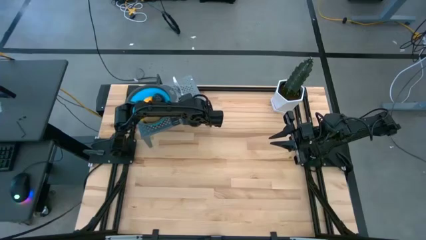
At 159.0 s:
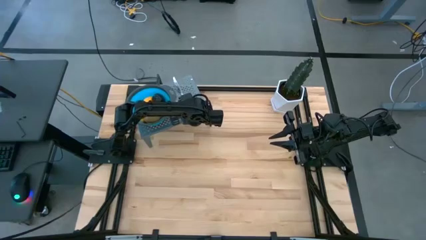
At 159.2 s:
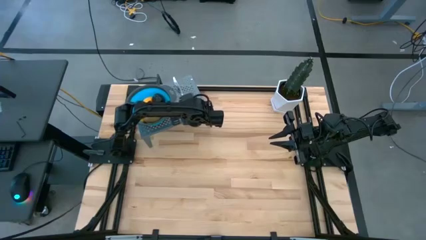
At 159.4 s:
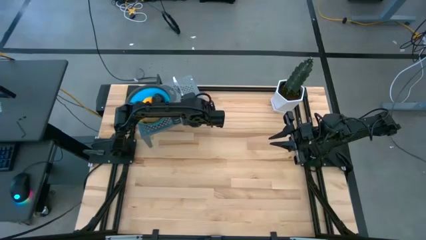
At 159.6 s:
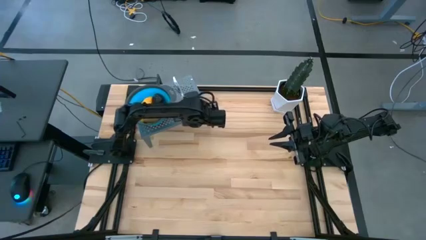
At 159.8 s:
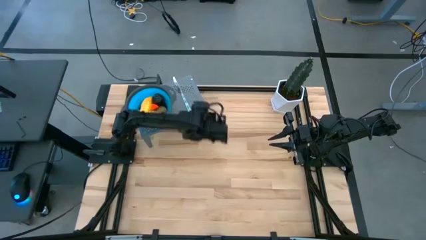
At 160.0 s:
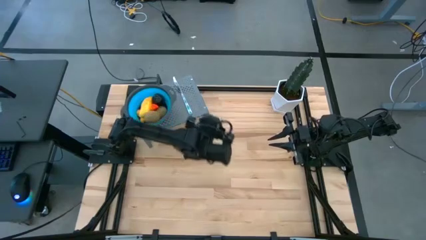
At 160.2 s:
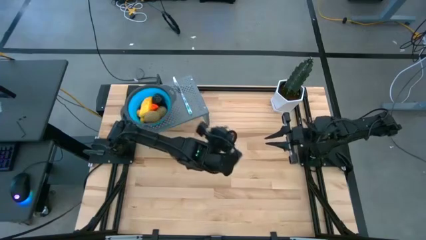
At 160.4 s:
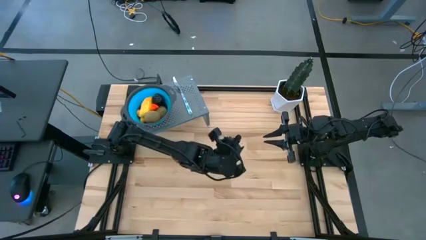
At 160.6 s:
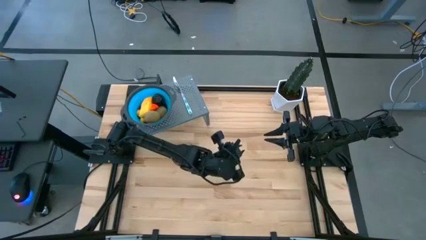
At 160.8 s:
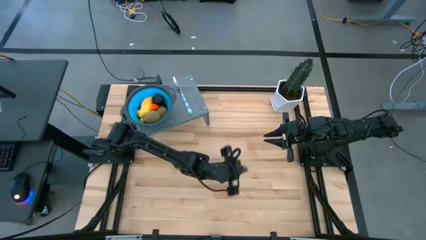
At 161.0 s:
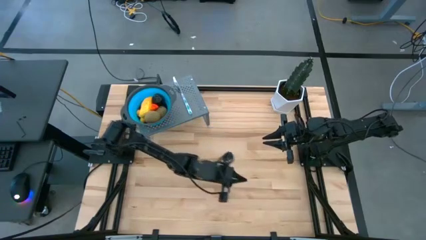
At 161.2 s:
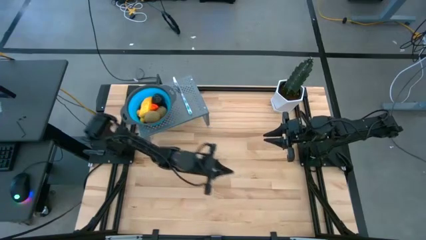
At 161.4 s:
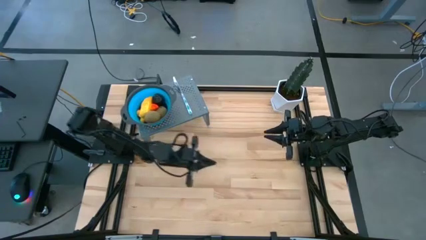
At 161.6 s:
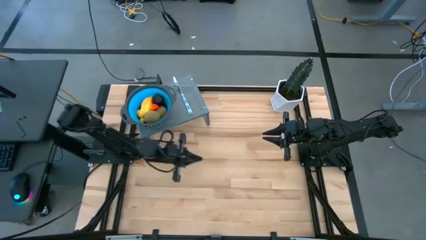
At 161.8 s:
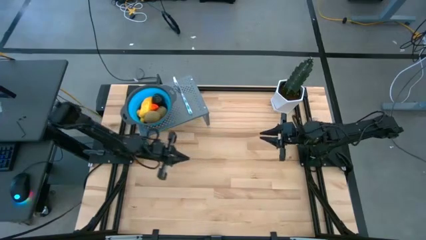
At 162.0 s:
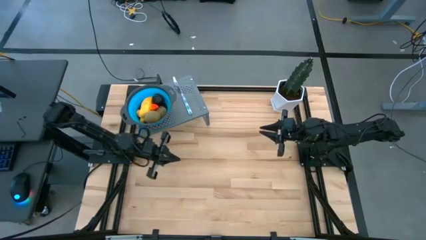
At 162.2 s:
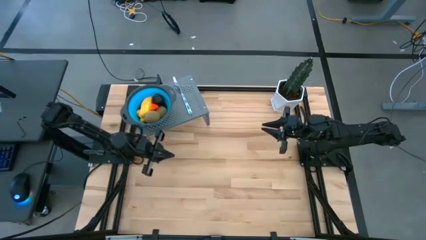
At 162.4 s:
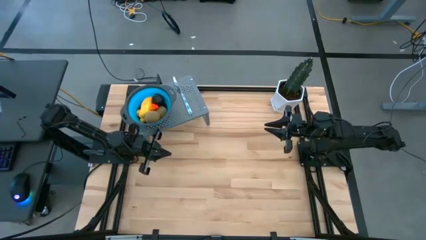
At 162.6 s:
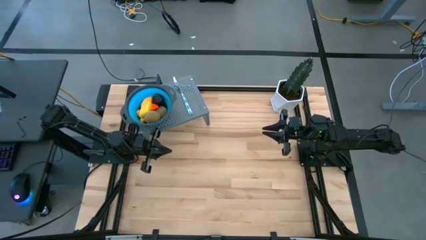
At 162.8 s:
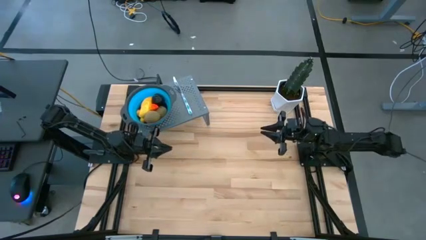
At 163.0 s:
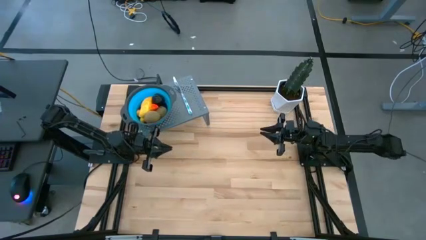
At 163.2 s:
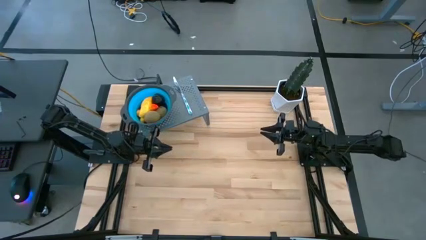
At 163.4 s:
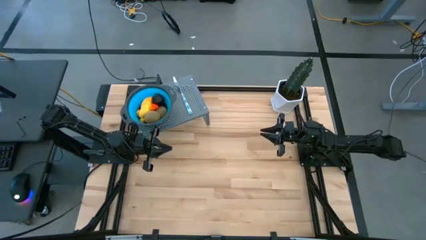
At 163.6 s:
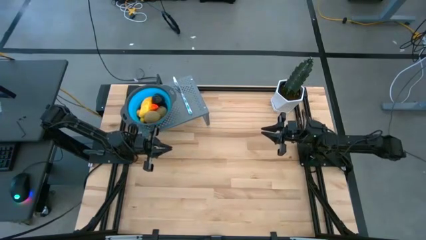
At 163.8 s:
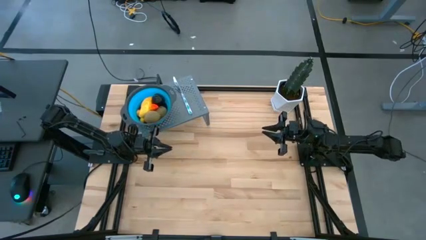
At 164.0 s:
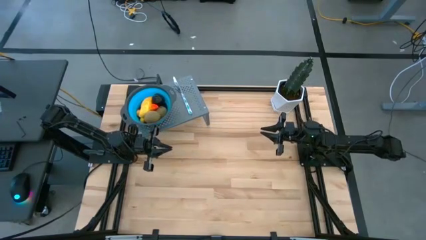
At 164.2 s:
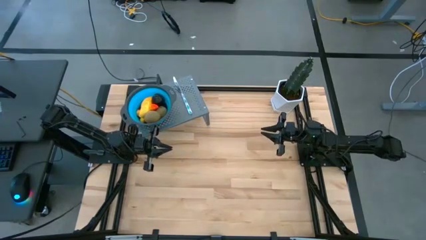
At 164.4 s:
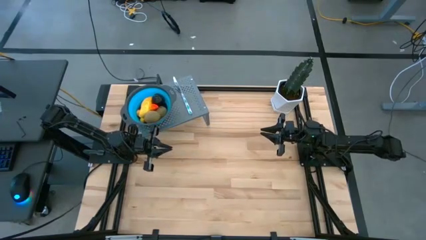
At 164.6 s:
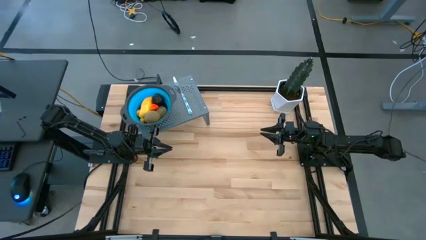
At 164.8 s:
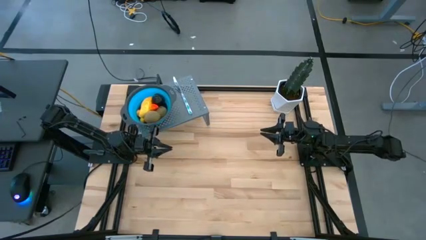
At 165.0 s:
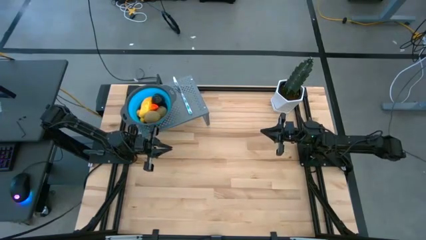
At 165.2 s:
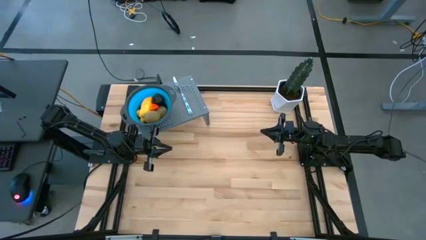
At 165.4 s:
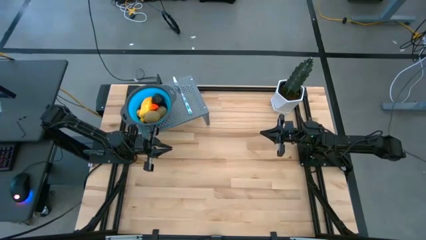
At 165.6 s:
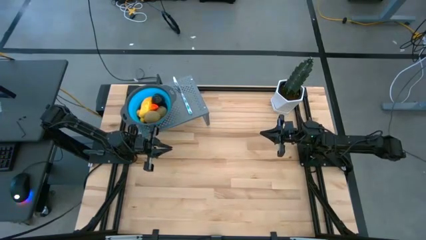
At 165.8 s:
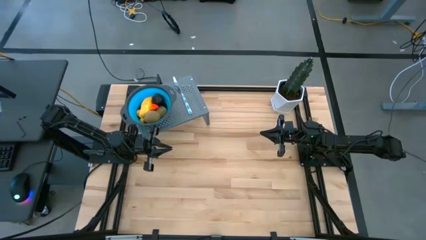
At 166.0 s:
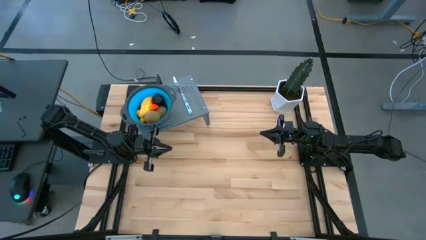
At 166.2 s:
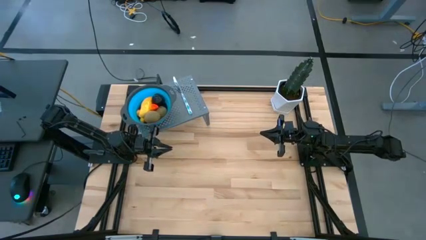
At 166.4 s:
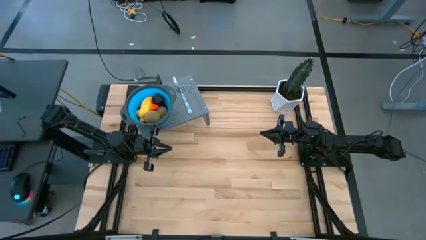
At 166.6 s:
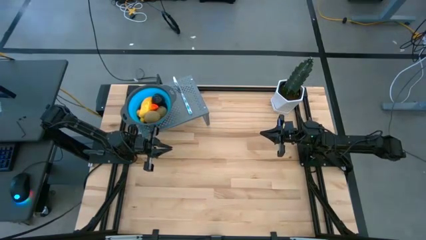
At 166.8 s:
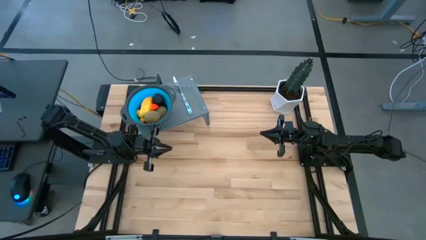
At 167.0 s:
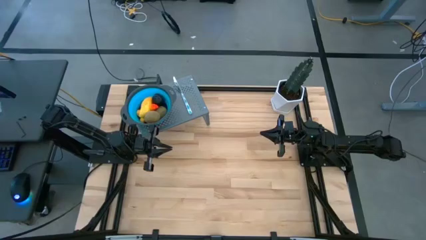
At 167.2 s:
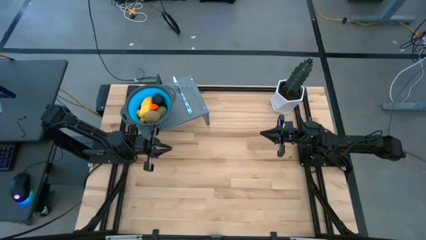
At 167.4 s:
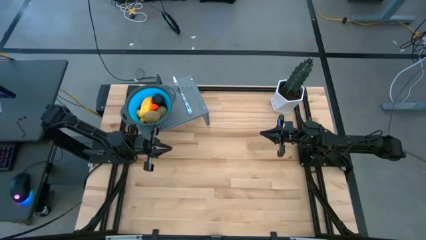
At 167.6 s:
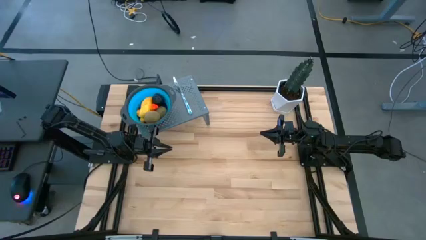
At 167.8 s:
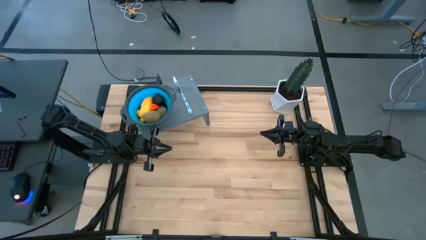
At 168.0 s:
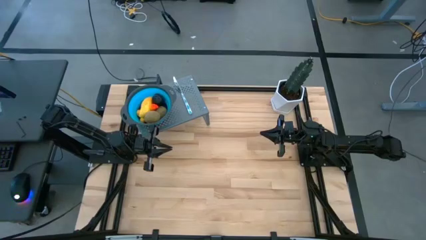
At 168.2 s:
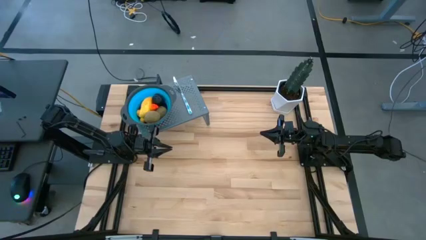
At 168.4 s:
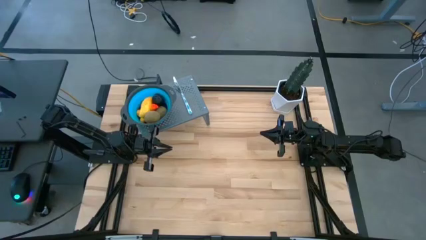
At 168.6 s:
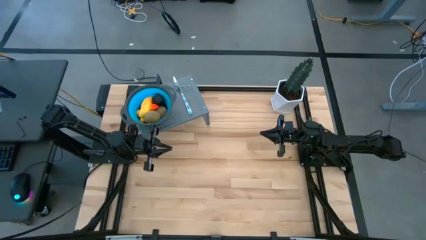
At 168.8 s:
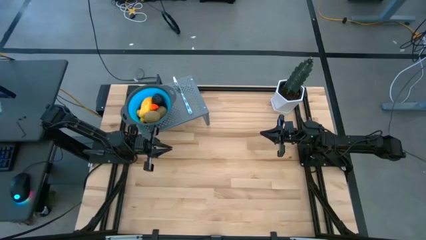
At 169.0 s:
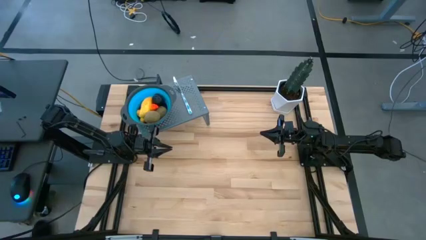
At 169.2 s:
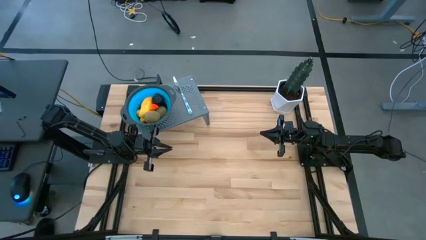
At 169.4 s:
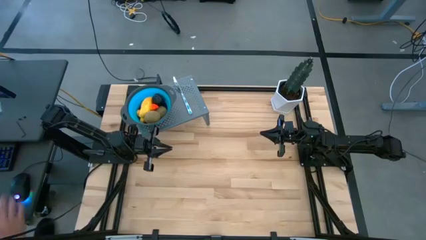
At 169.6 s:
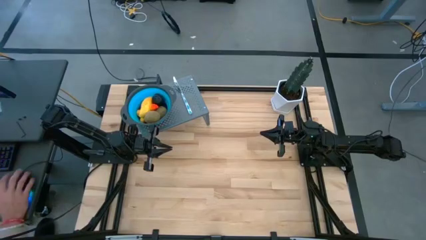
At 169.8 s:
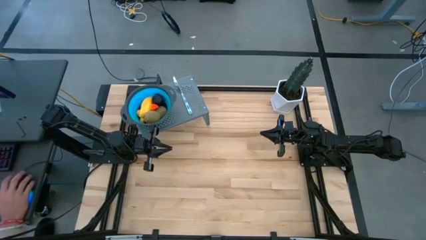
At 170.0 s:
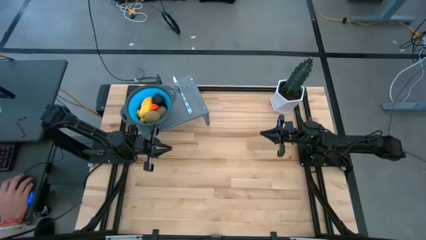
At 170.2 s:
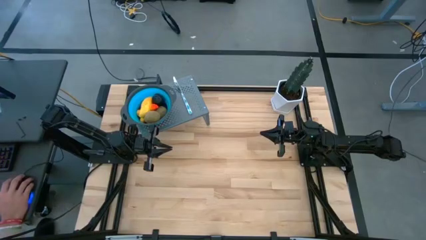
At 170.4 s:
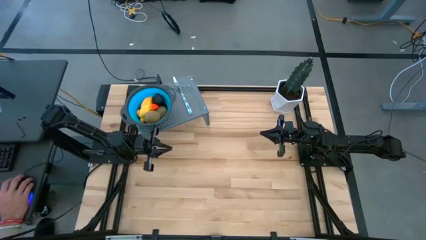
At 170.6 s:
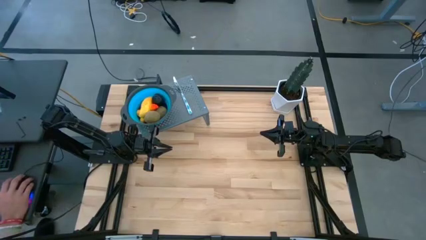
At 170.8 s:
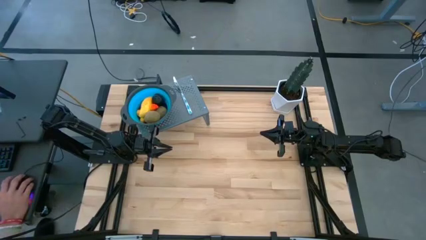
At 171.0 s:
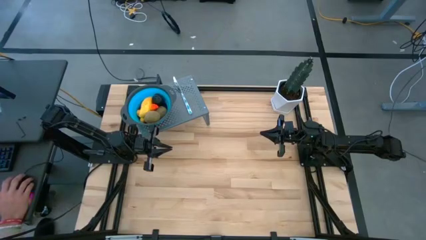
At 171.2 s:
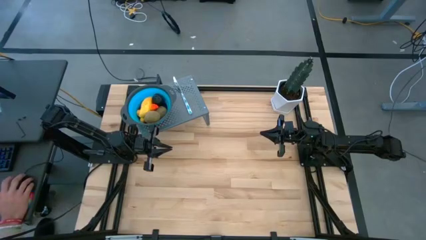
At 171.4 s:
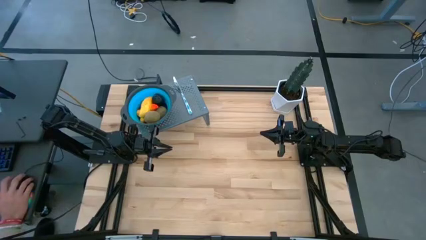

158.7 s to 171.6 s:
Task: Pick & Place Fruit
Return to home position

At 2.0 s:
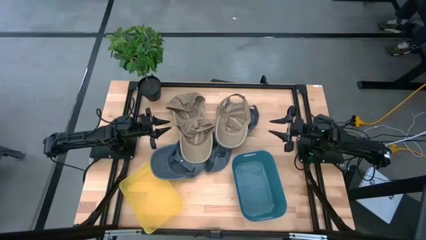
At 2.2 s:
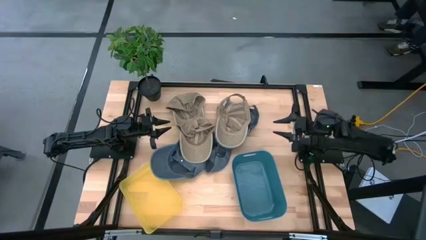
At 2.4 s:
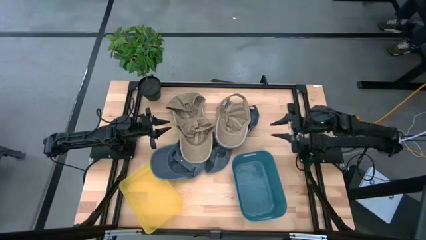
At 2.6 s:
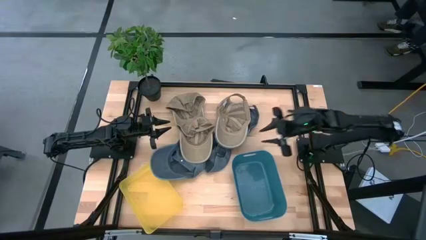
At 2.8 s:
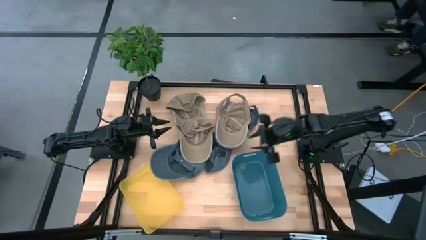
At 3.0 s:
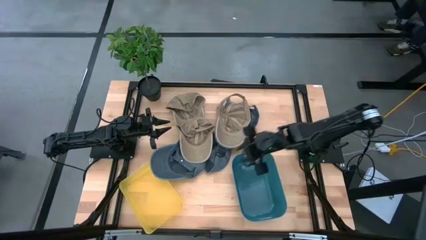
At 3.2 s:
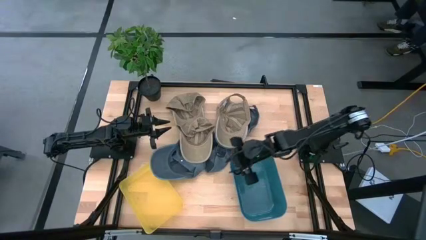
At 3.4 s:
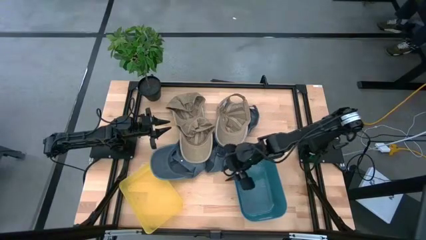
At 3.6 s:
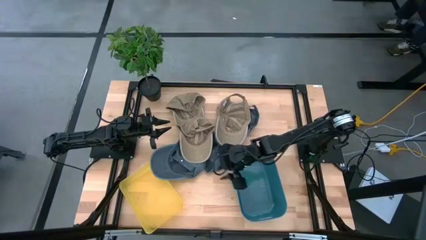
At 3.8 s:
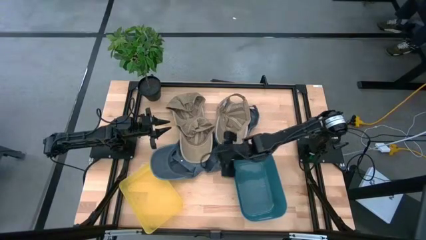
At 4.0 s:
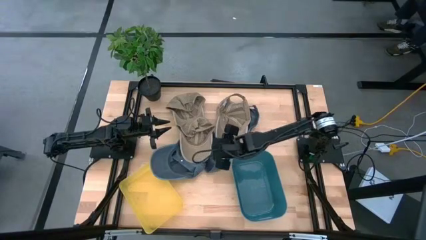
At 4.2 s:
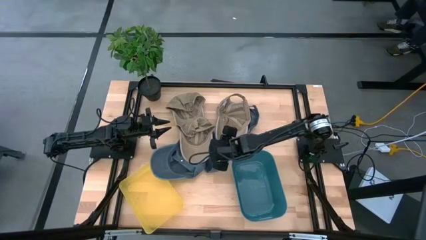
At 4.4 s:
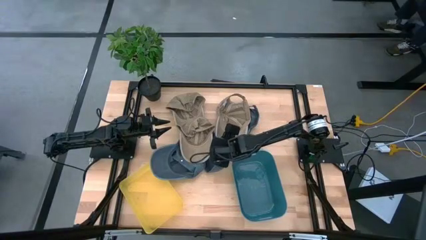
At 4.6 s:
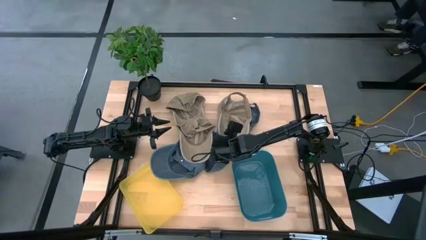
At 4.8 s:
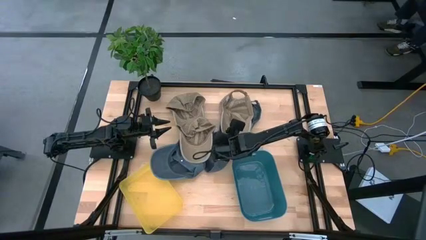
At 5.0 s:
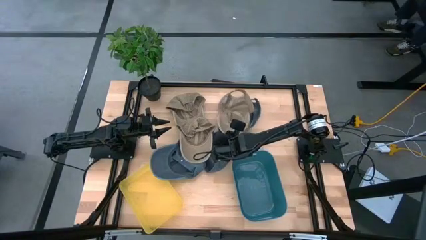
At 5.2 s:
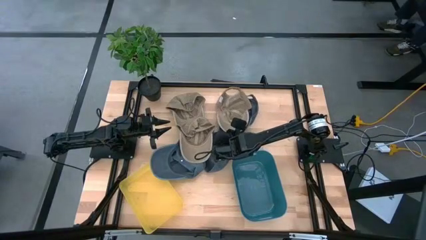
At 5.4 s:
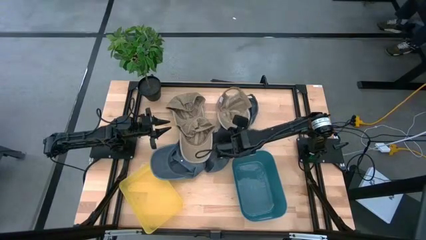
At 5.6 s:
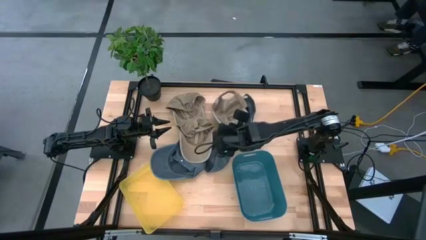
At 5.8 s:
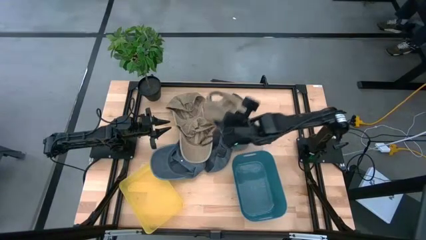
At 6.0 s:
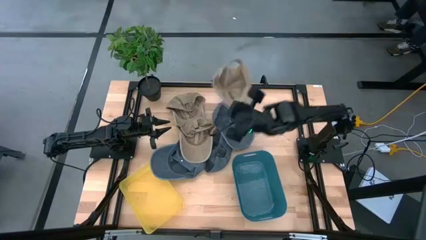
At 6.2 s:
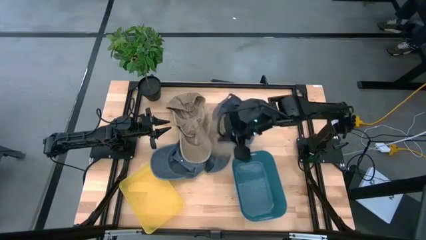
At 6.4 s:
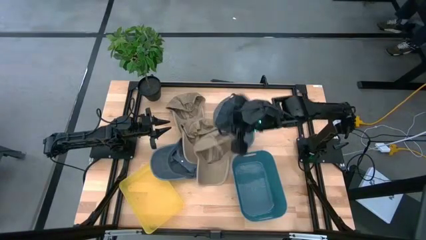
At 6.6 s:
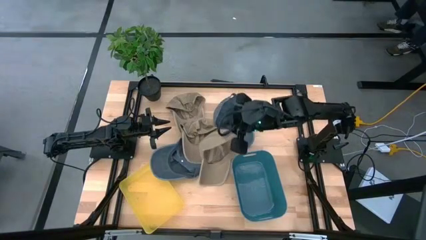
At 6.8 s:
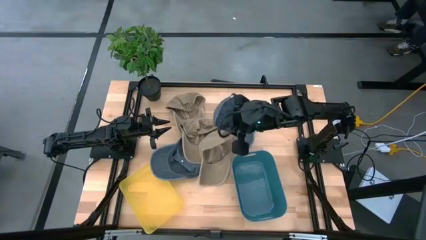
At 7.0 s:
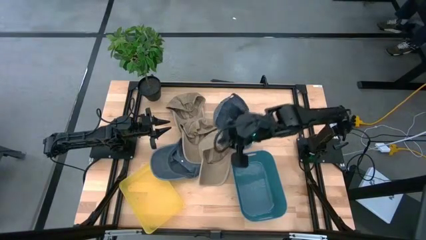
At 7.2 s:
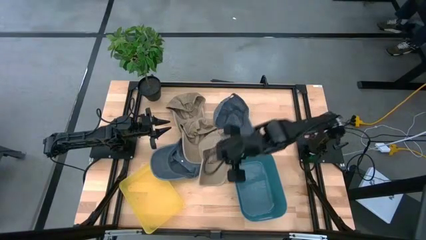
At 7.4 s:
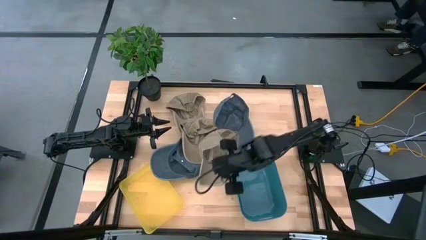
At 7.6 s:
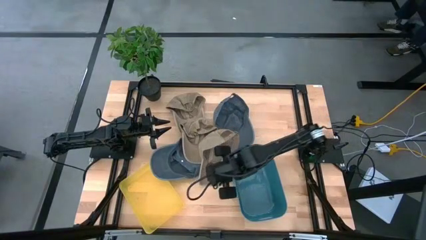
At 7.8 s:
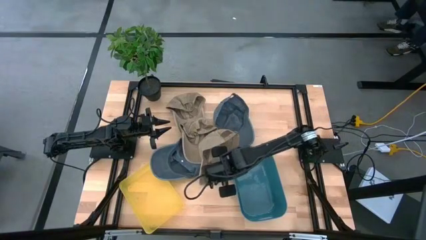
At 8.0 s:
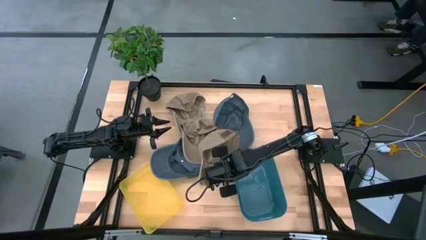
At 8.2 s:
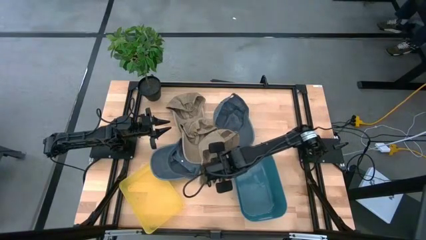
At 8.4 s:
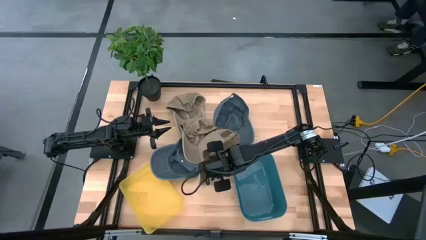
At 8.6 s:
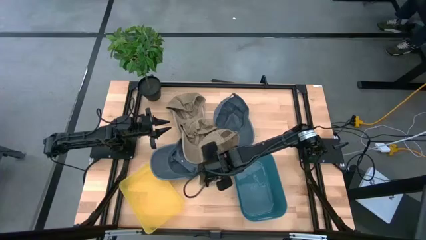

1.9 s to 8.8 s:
Task: Pick & Place hat
Put the right brown cap into the blue bin
